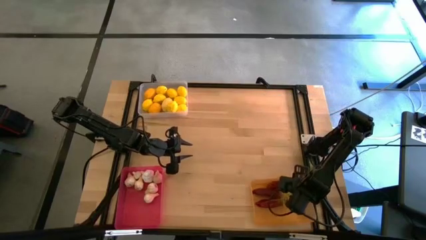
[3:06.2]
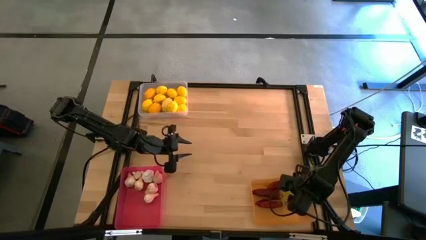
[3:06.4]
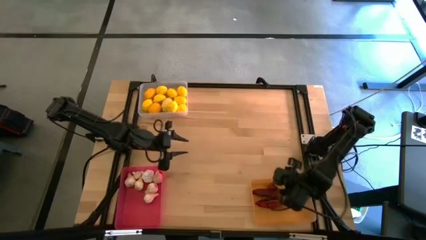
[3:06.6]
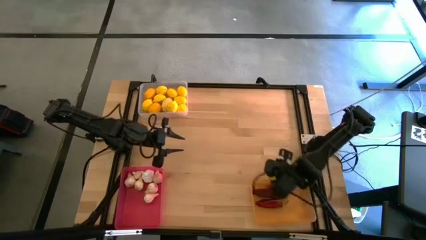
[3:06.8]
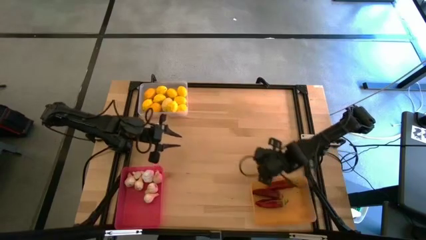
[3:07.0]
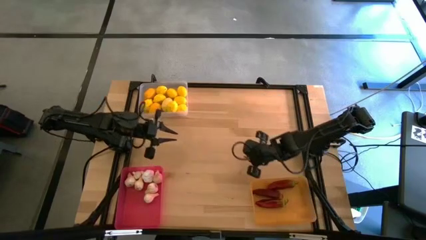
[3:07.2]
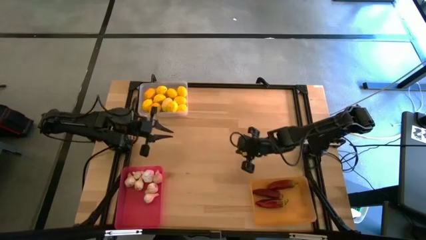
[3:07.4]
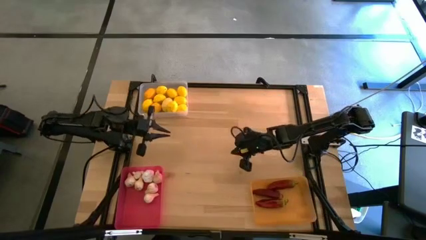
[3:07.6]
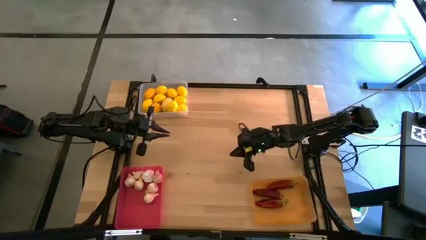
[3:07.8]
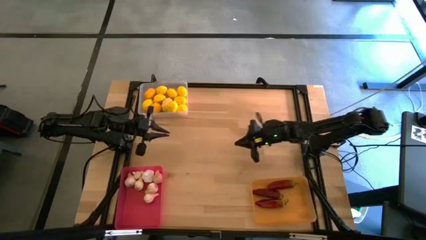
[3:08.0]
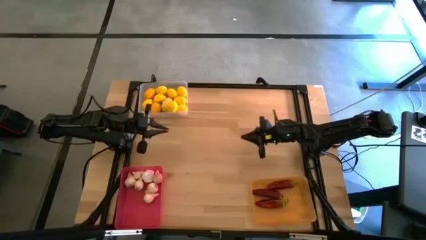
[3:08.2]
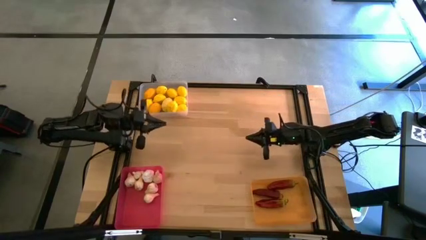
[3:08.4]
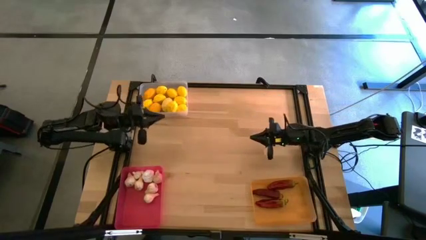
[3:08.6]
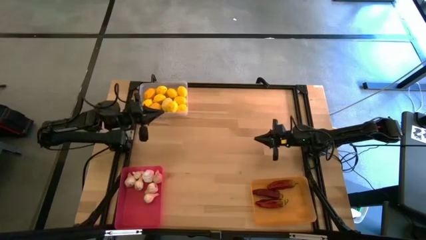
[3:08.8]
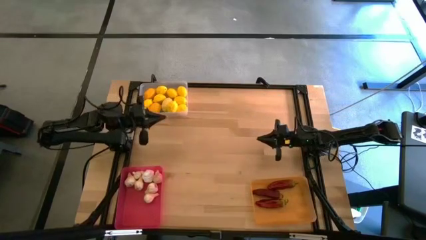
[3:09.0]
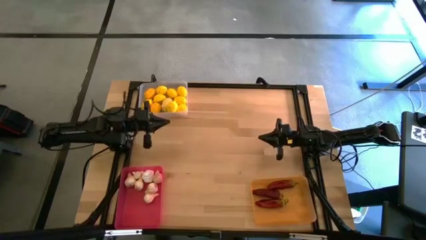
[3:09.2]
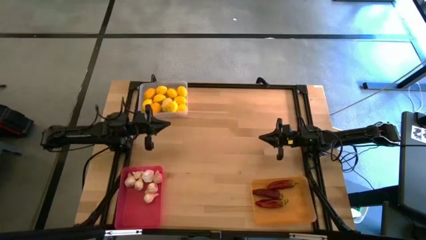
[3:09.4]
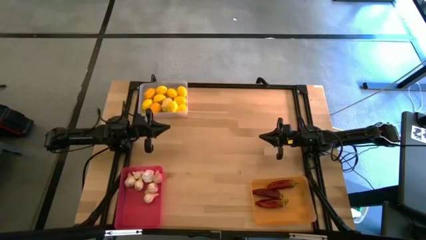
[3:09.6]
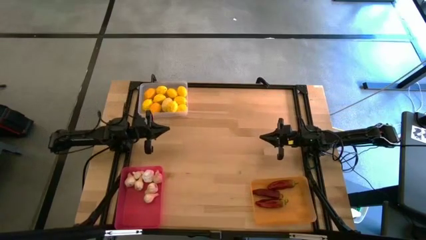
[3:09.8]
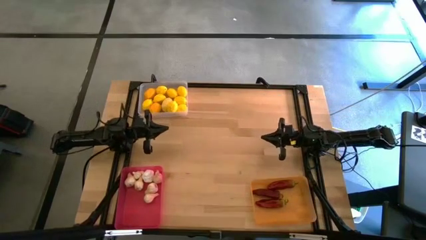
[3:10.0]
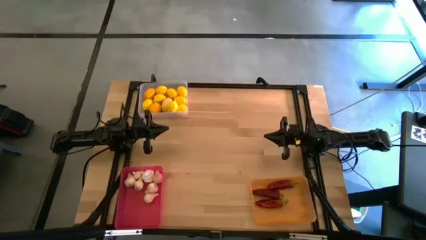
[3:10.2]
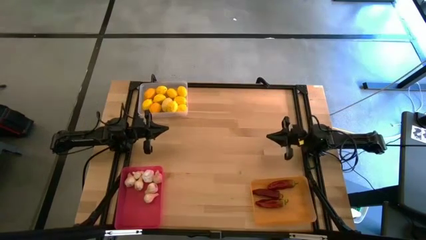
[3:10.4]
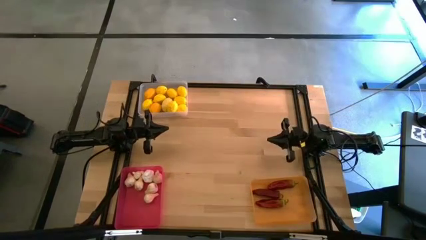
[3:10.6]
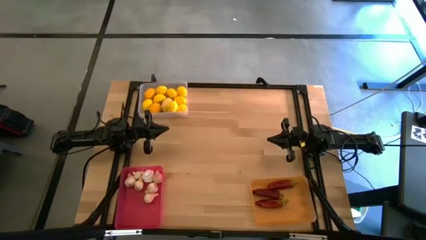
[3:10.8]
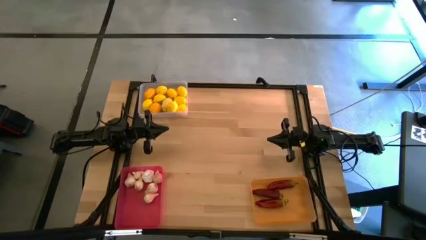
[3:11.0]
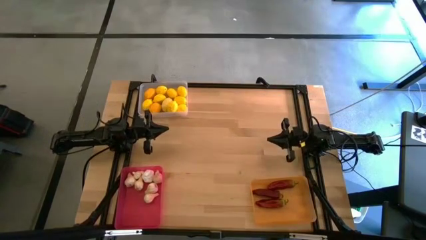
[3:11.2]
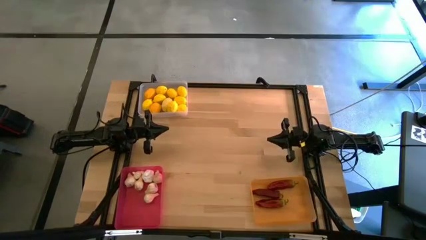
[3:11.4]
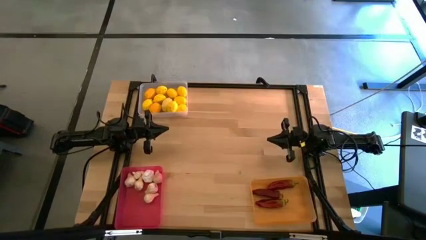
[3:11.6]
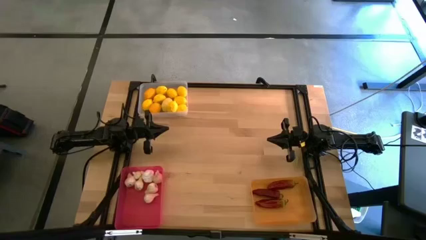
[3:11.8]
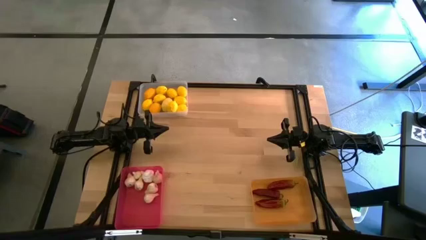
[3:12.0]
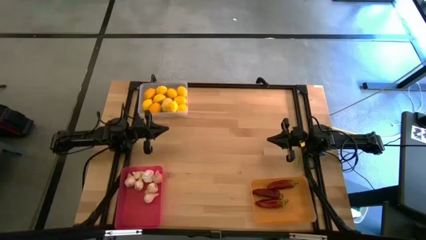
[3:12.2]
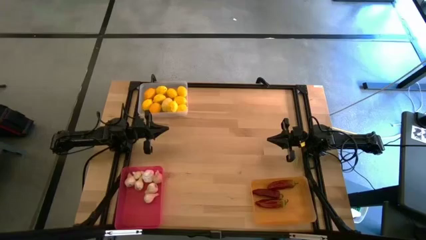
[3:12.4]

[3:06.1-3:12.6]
Task: Sort produce into baskets
Return to Home Position

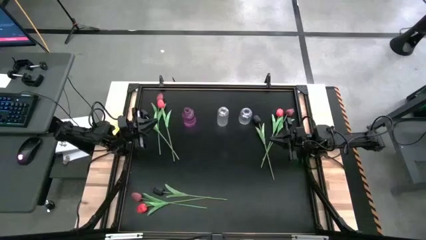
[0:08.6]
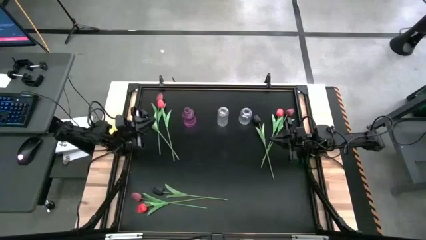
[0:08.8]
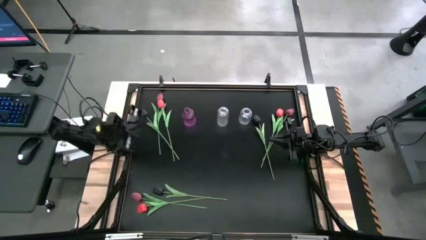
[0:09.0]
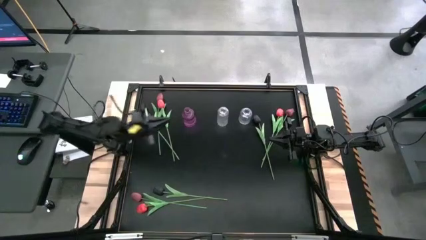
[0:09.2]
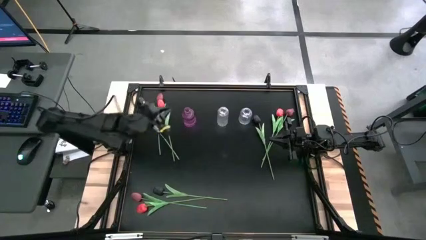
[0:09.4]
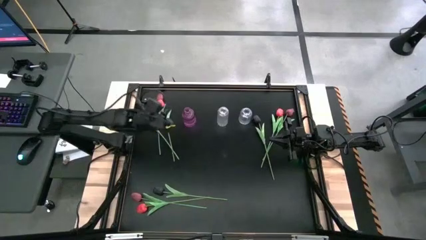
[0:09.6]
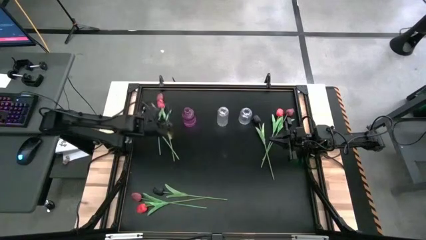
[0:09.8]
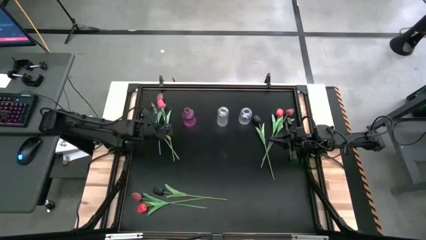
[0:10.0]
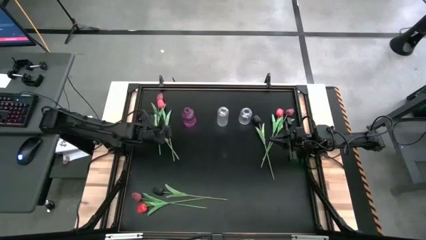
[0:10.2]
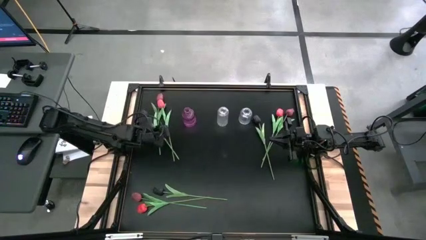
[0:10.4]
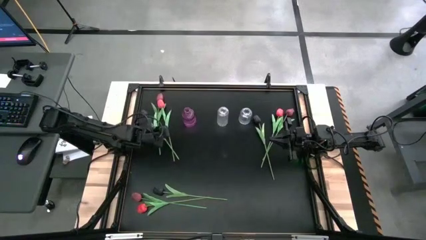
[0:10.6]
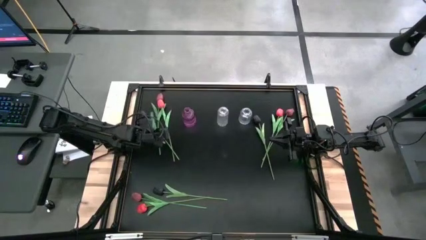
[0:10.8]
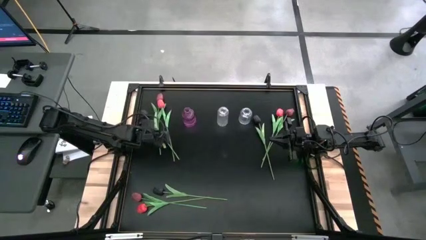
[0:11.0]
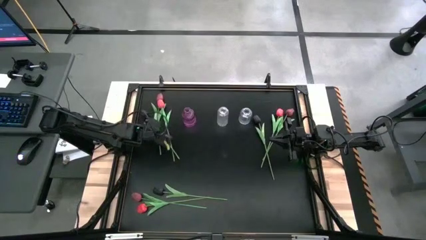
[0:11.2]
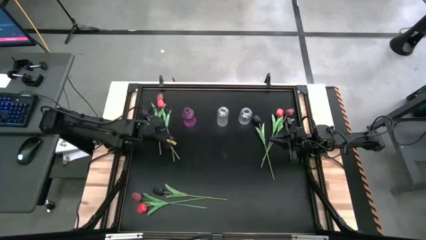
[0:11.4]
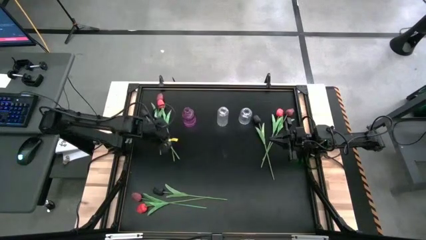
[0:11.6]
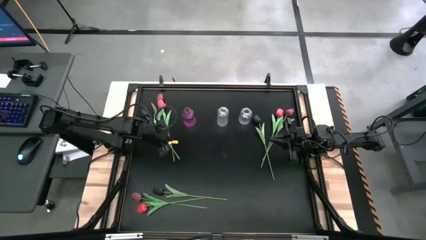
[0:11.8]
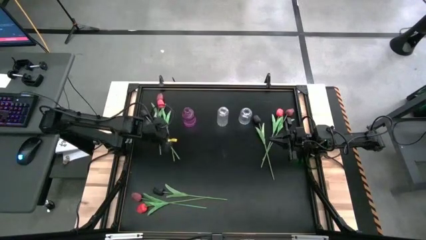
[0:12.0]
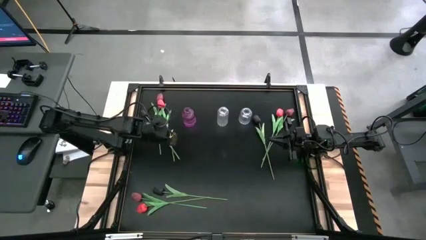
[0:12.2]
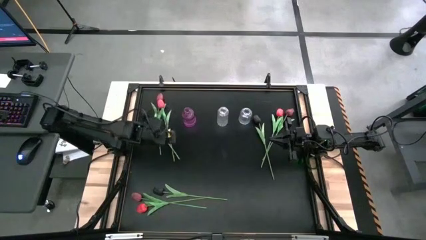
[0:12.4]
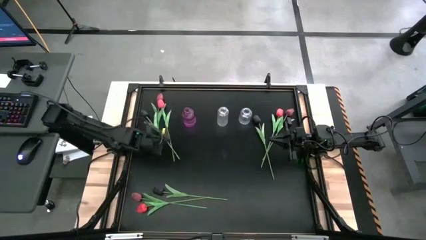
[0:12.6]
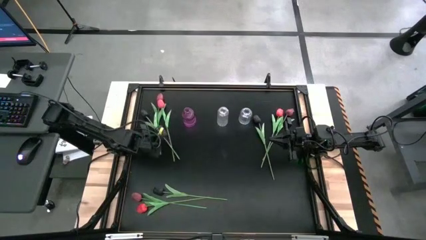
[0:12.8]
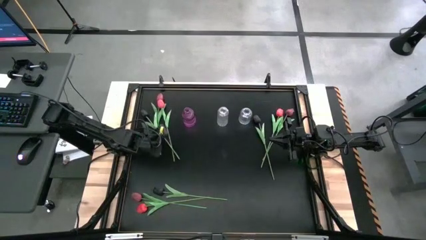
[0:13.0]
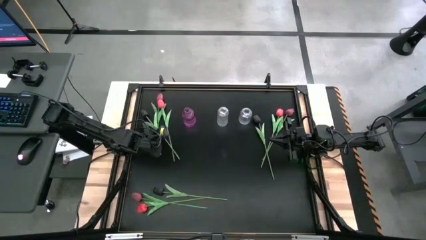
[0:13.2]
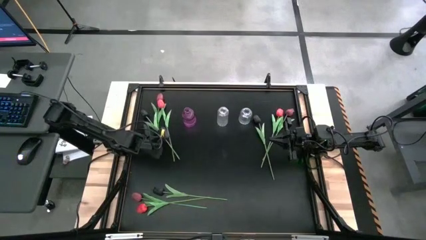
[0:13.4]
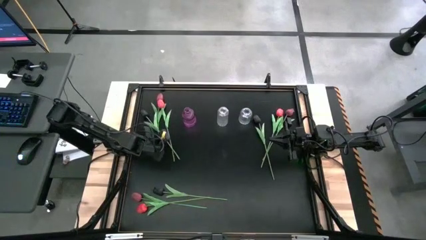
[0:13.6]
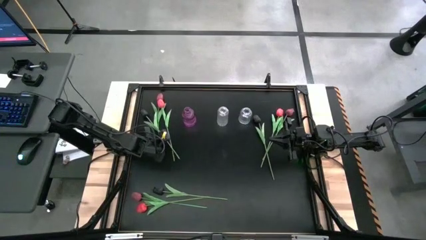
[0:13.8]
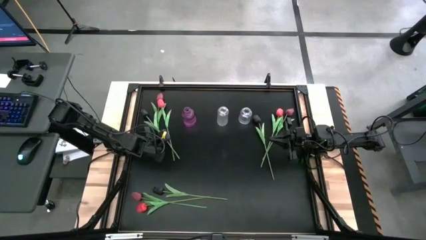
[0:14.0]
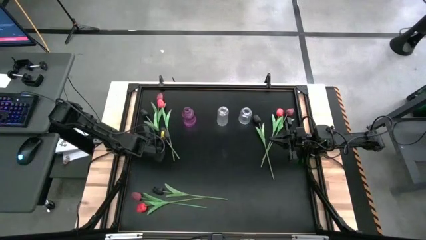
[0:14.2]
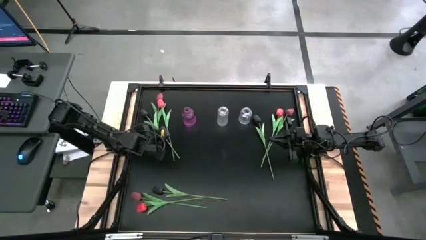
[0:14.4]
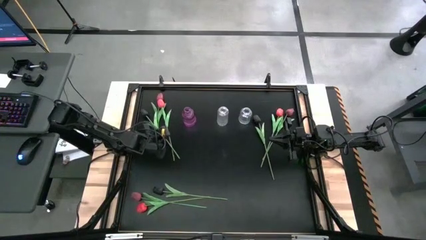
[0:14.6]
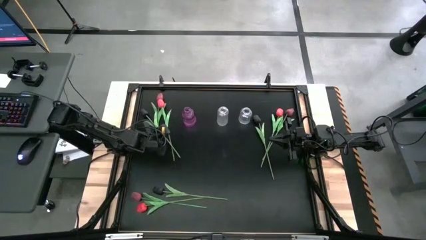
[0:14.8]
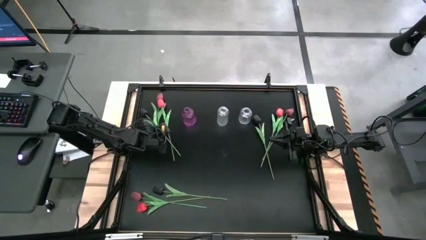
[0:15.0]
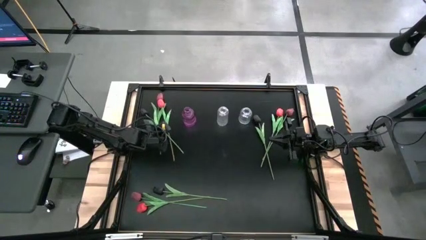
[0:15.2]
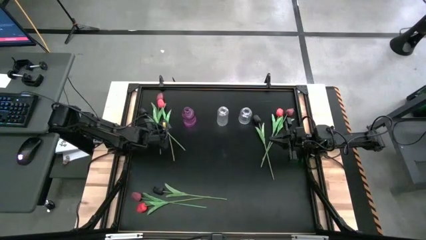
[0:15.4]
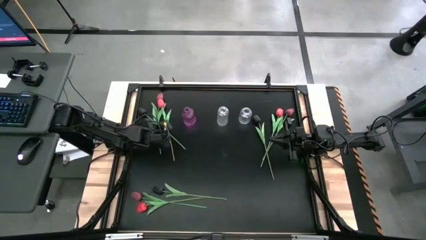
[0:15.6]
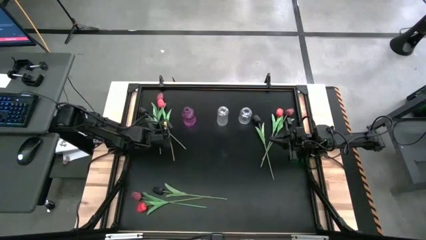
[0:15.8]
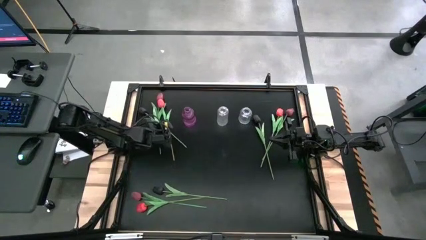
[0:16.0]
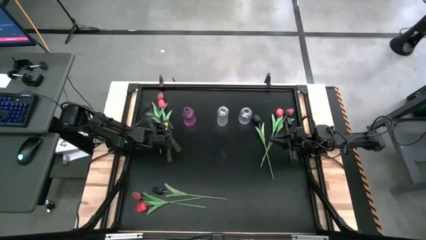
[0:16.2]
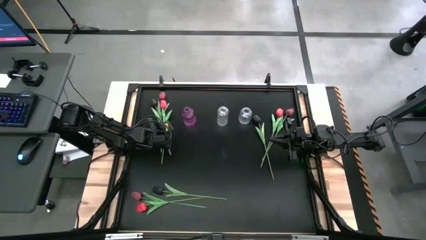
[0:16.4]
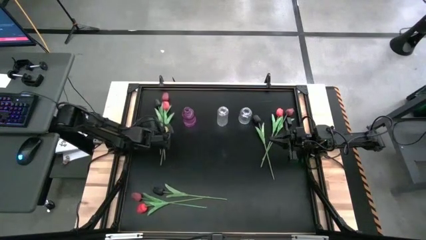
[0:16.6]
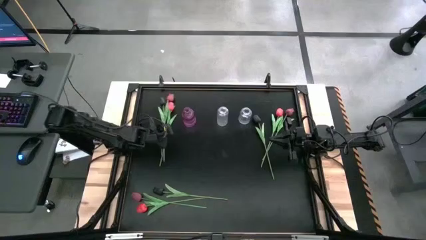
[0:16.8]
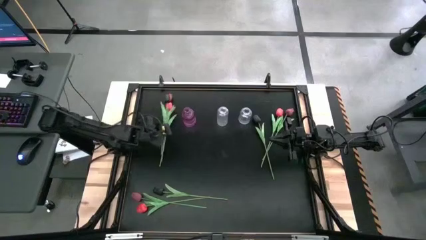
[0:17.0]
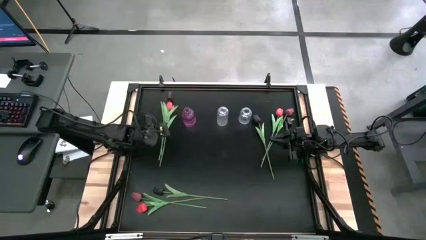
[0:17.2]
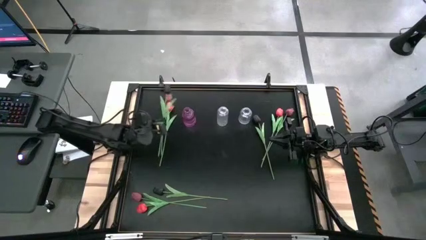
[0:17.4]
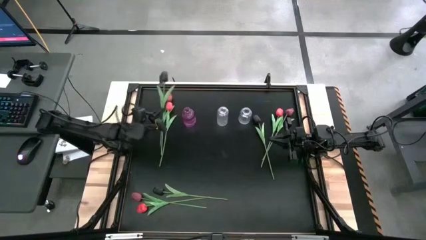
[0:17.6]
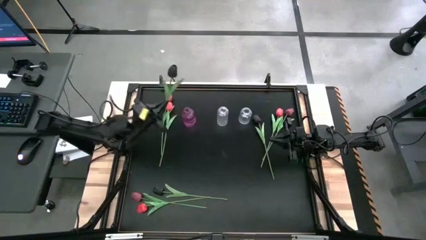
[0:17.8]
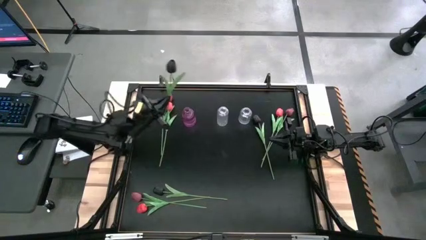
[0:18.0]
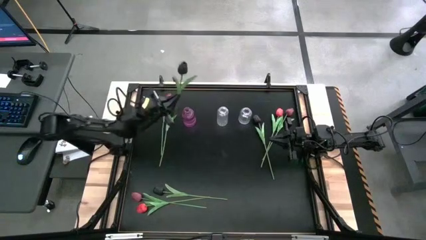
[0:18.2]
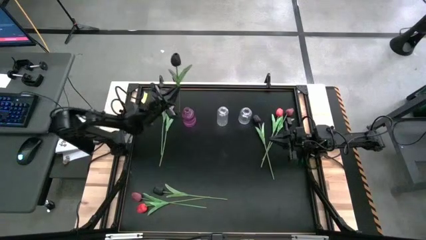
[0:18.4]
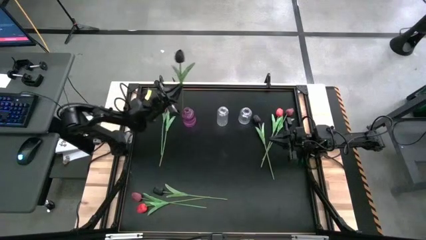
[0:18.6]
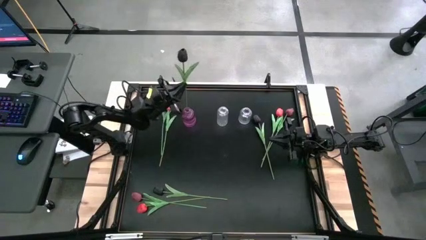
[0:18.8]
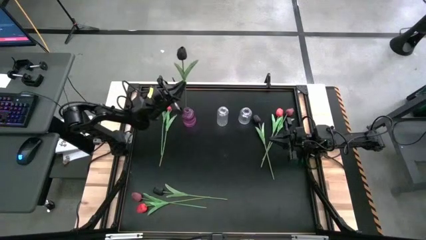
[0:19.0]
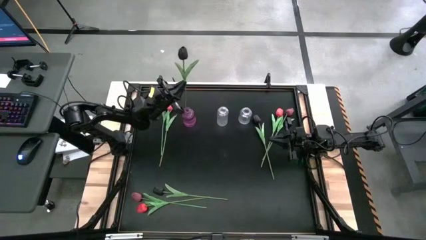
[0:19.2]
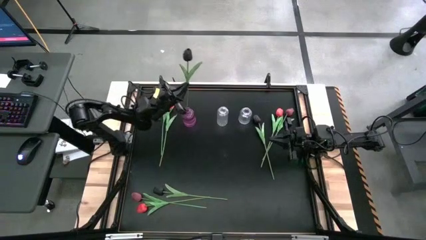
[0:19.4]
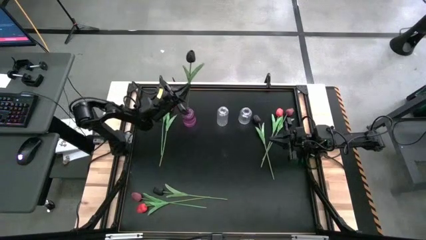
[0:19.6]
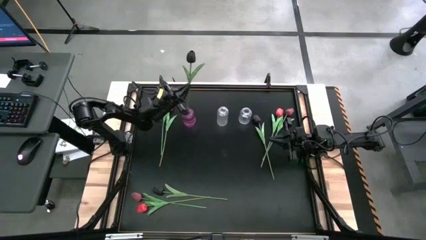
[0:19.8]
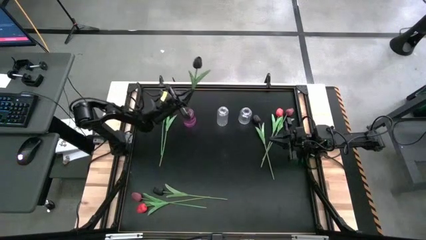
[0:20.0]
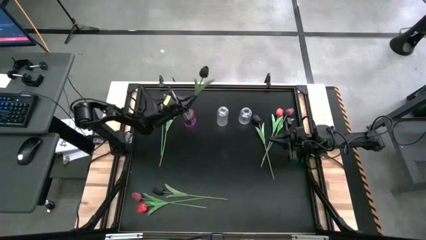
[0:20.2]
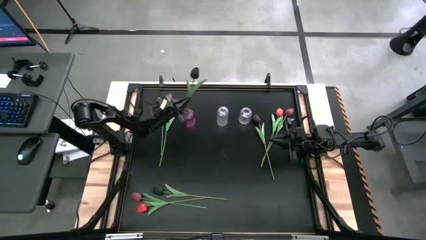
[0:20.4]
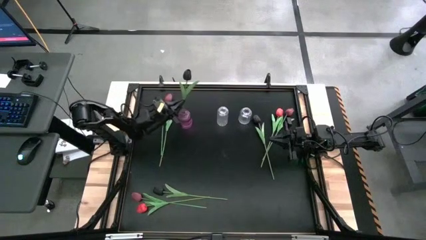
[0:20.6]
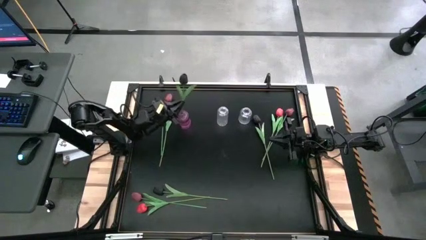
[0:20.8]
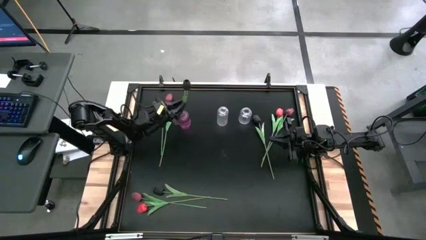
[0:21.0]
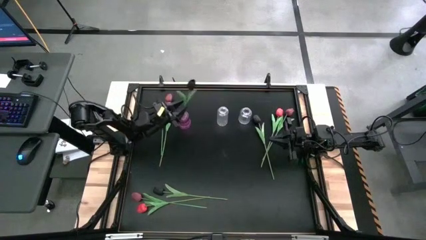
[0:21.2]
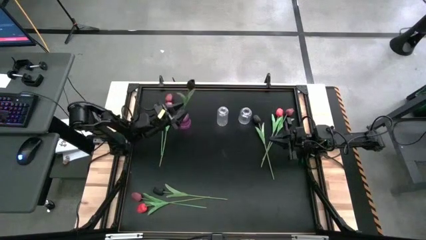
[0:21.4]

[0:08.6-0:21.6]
Task: Sort flowers into vase by color
Put the top left black flower into the transparent purple vase
